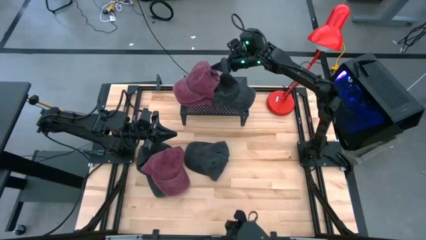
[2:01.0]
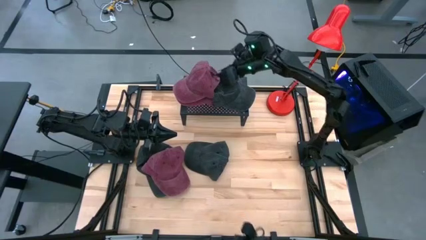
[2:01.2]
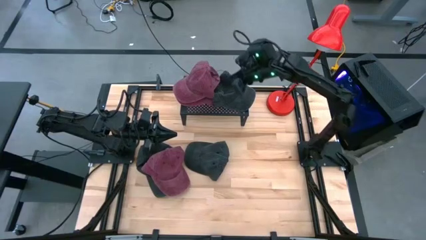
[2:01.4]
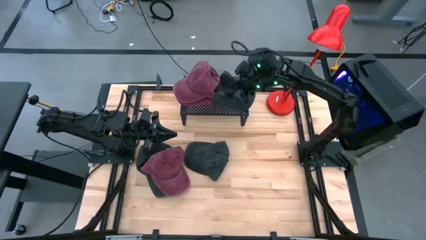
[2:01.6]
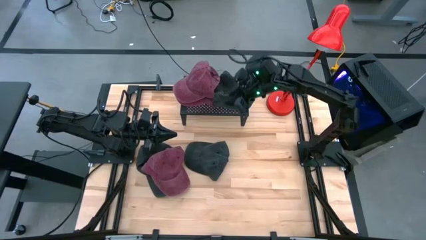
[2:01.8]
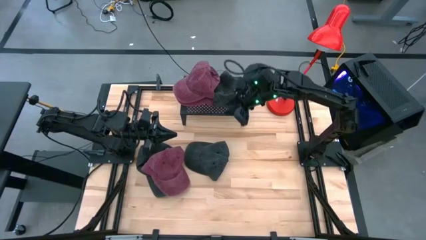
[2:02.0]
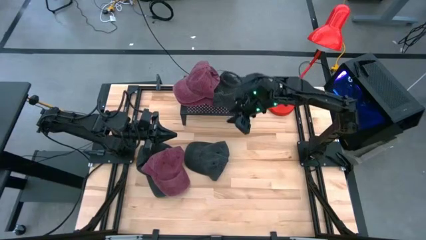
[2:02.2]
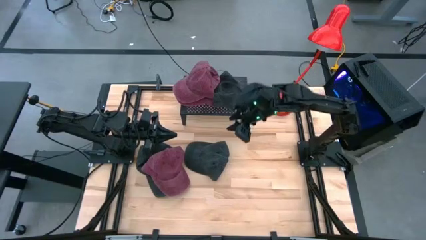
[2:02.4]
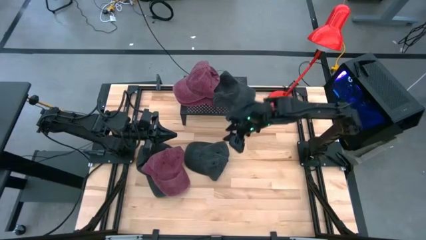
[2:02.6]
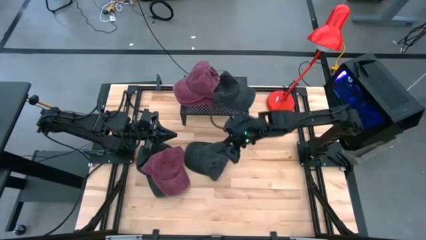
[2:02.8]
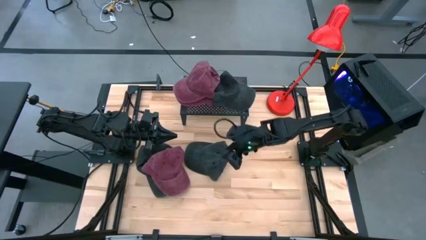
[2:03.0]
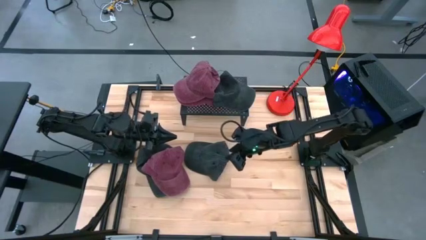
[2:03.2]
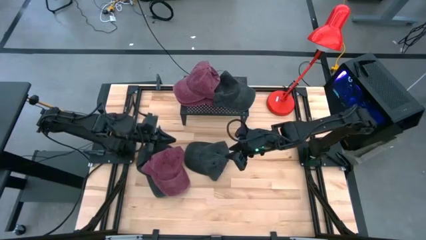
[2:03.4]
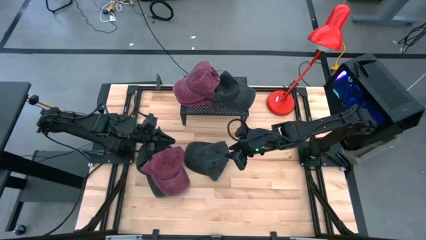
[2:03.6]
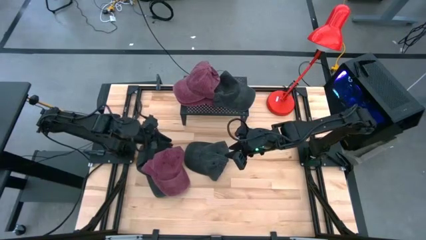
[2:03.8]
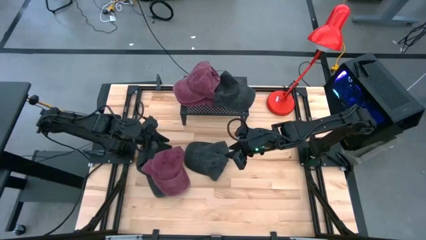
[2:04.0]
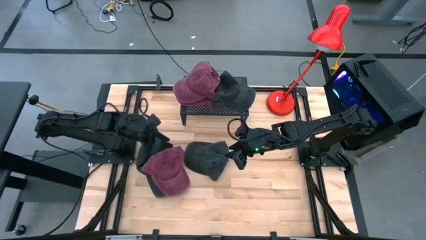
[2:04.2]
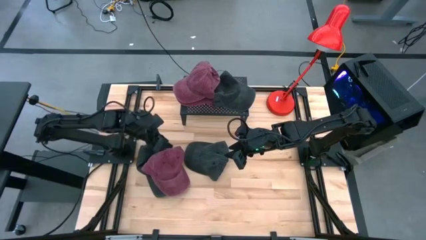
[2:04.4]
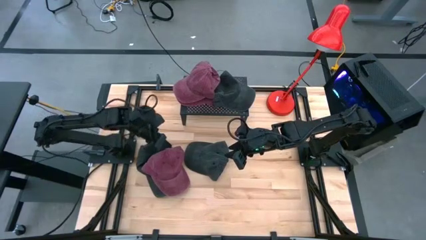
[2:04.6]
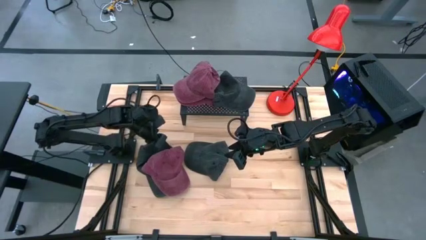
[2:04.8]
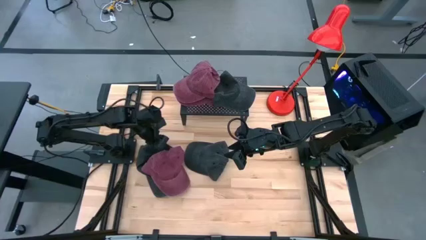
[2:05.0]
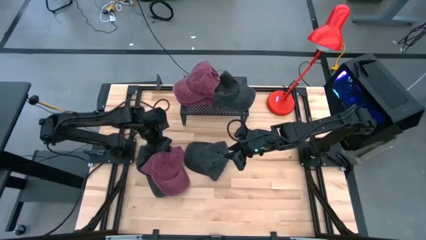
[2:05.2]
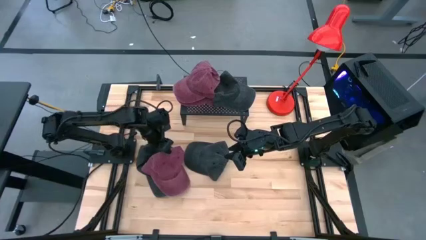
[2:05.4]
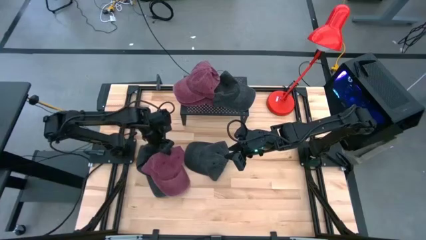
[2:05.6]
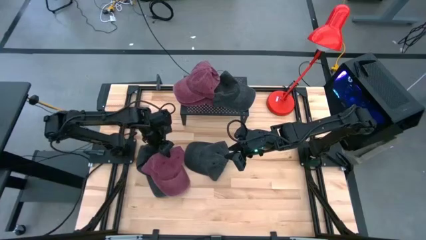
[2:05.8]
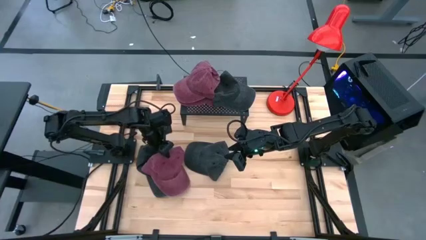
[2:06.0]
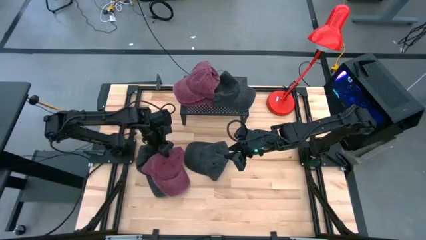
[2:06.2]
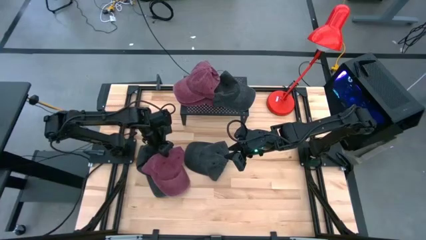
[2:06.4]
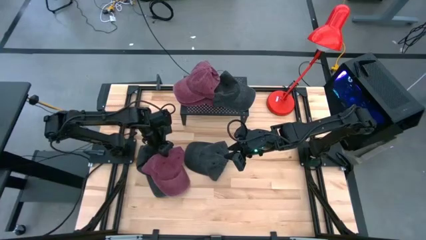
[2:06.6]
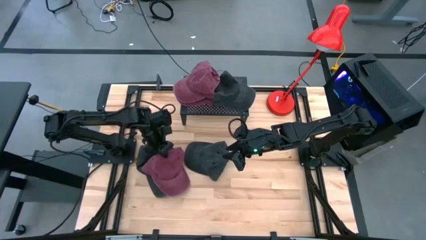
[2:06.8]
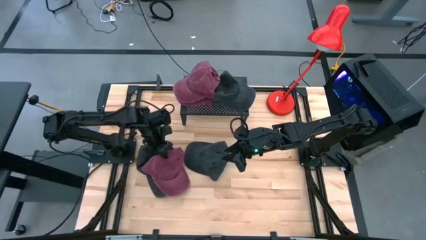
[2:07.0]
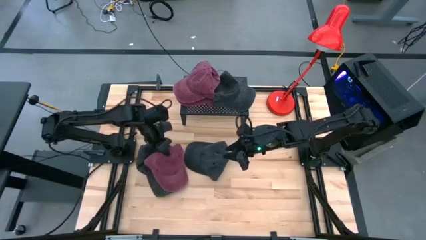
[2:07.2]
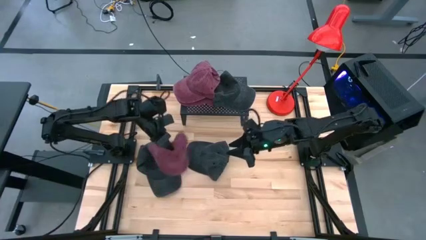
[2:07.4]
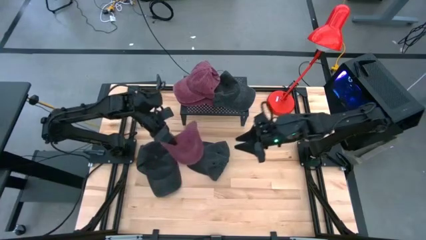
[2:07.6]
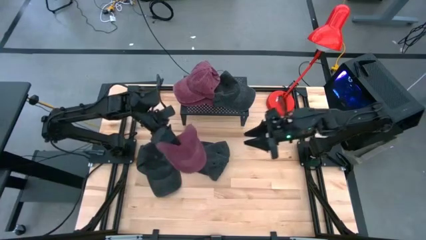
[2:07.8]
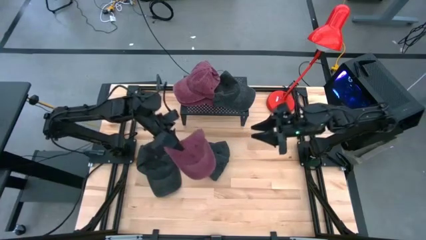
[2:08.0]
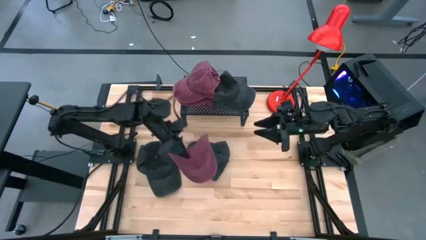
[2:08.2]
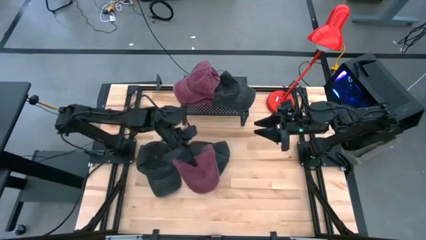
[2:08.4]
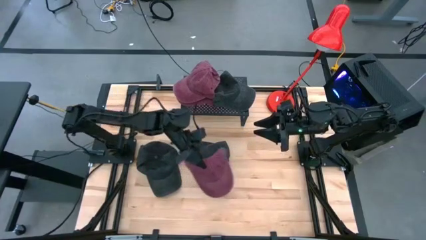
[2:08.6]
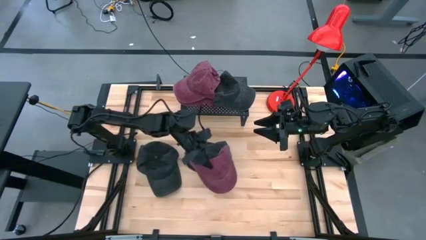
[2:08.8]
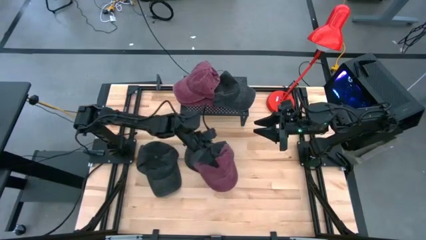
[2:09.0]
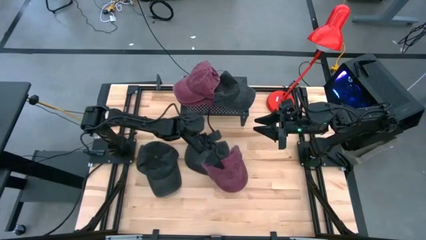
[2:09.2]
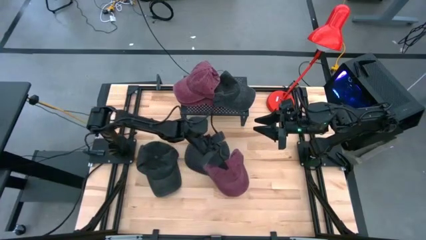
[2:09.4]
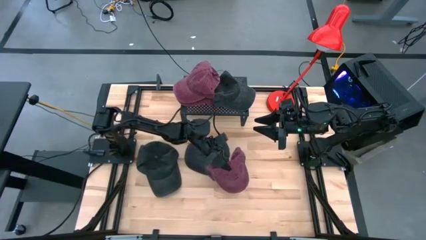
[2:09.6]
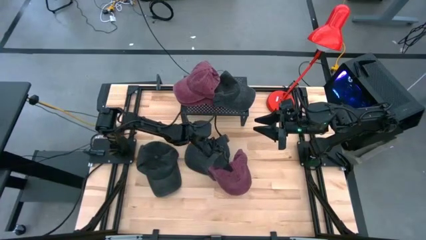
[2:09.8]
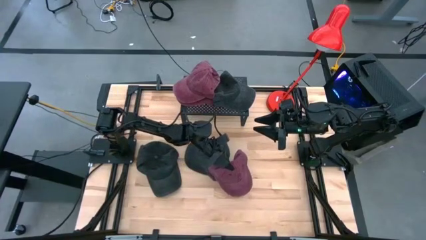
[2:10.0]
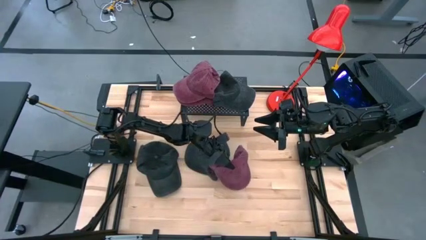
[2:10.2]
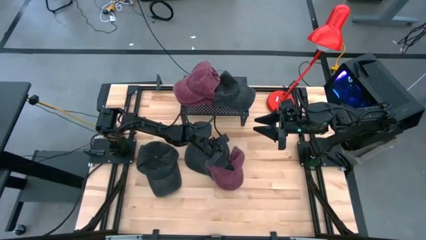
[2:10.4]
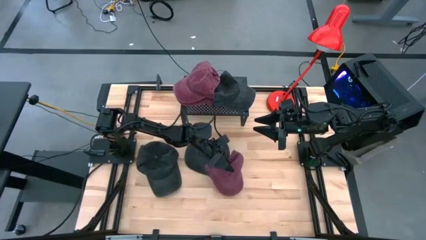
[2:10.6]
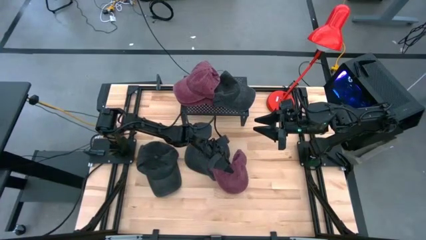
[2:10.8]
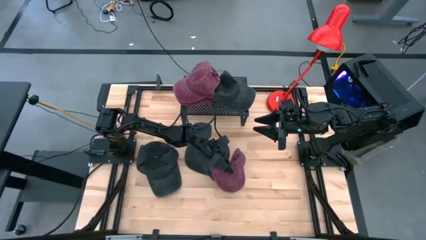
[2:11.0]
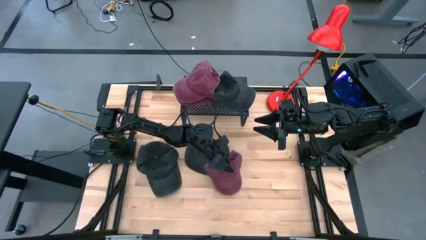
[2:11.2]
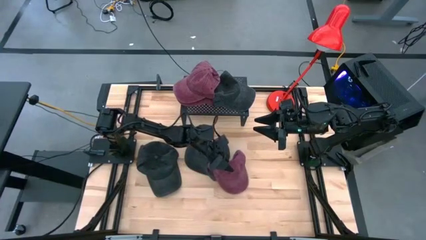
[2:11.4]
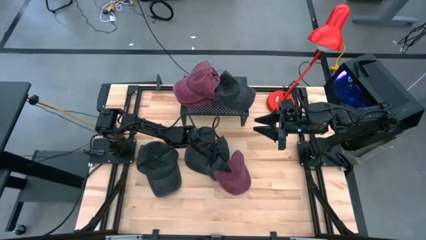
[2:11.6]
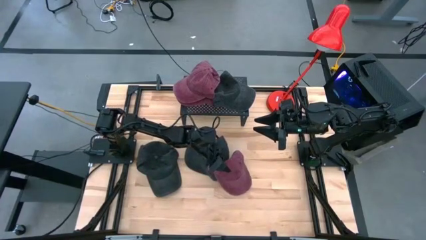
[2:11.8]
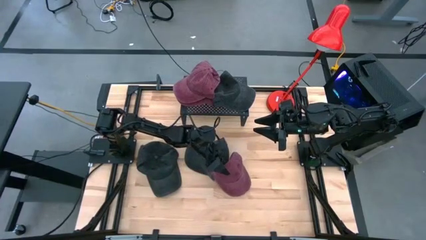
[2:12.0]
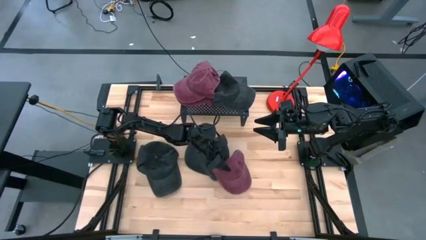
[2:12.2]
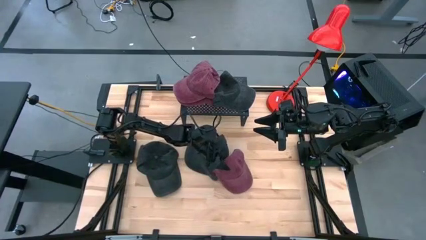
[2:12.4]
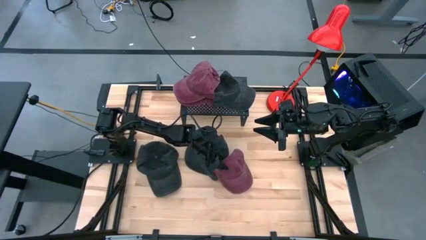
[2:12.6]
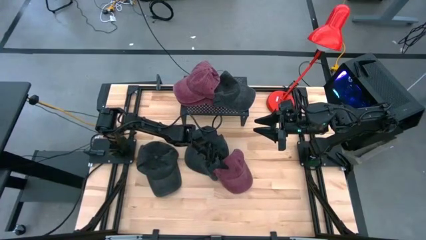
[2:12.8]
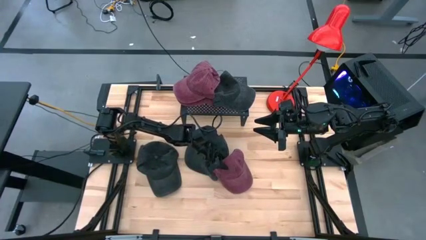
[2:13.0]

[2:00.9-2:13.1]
Task: Pick & Place hat
Put the red cap on top of the stacked red caps on the shelf

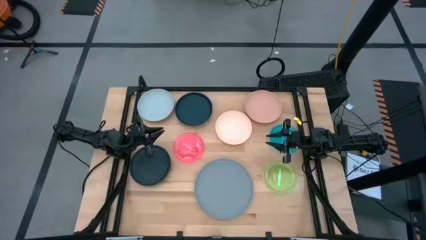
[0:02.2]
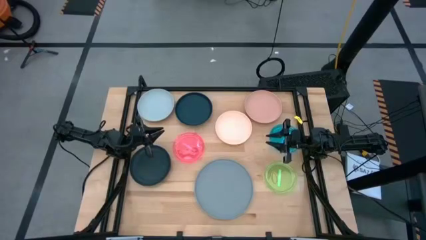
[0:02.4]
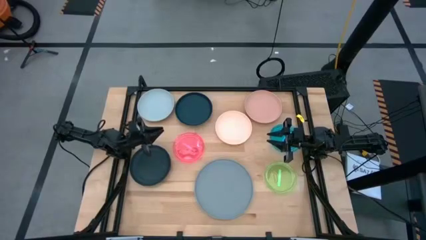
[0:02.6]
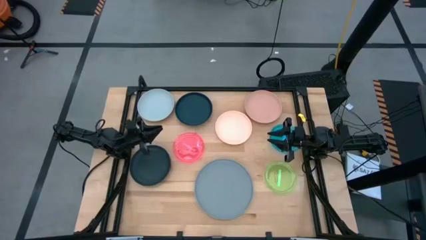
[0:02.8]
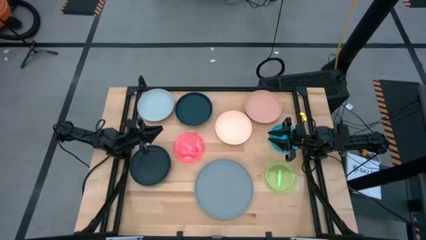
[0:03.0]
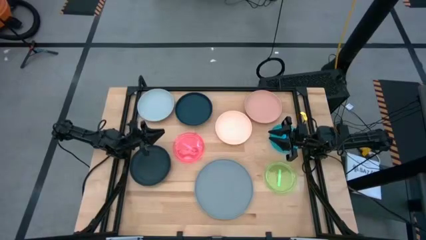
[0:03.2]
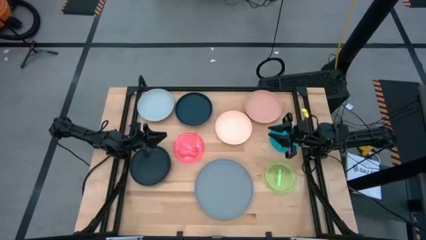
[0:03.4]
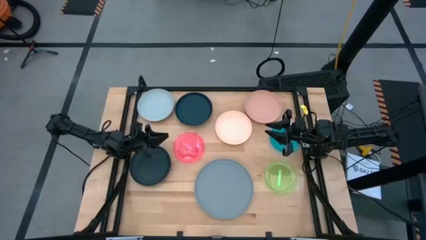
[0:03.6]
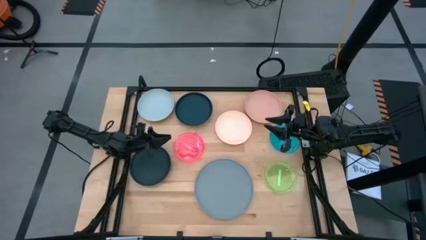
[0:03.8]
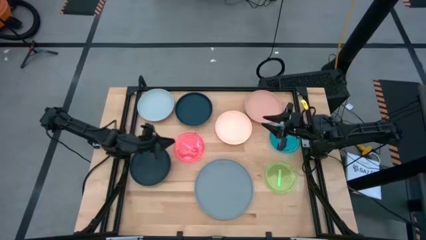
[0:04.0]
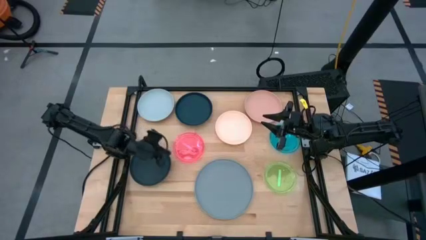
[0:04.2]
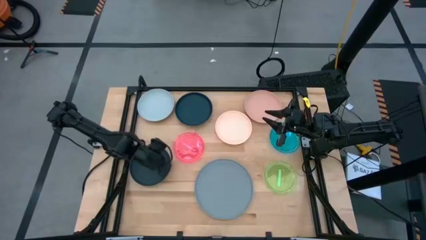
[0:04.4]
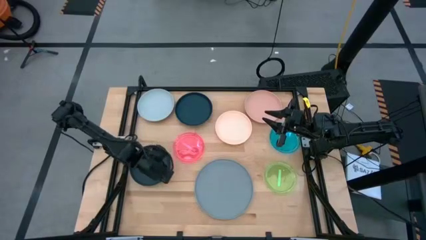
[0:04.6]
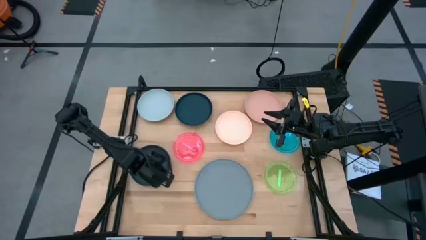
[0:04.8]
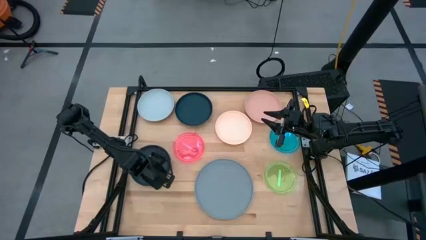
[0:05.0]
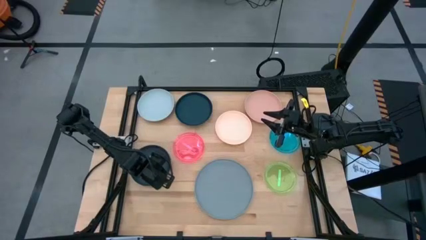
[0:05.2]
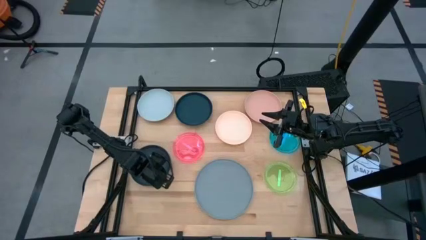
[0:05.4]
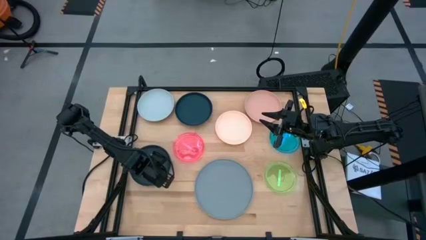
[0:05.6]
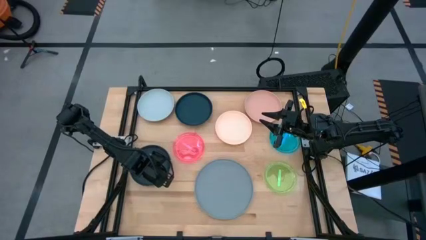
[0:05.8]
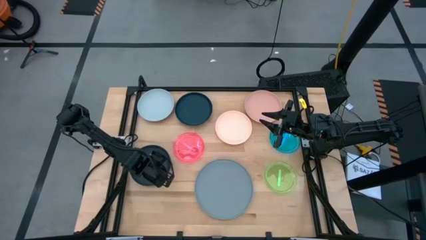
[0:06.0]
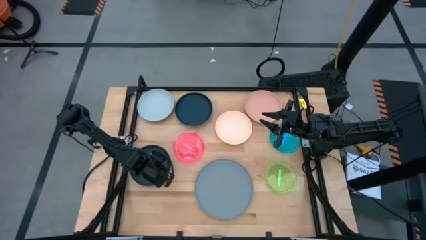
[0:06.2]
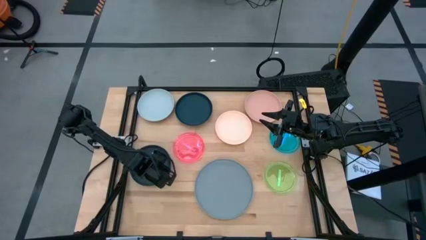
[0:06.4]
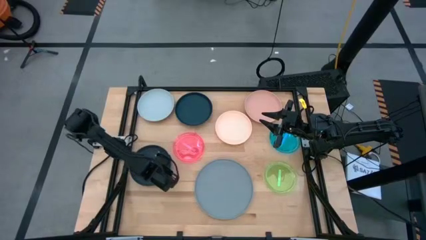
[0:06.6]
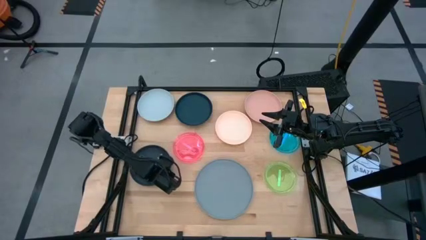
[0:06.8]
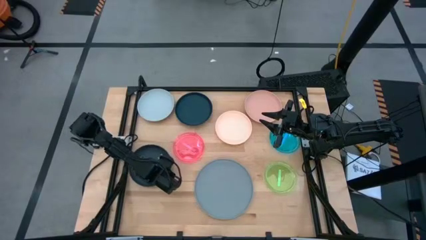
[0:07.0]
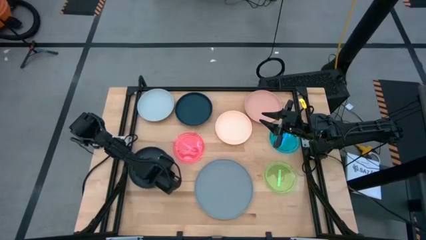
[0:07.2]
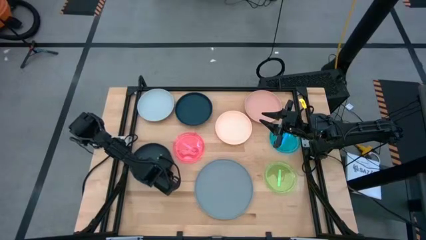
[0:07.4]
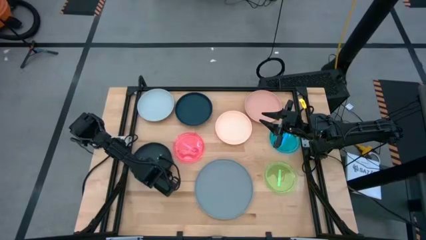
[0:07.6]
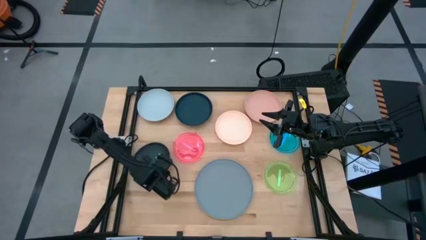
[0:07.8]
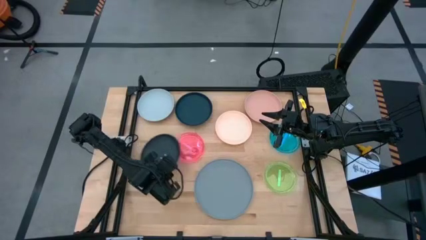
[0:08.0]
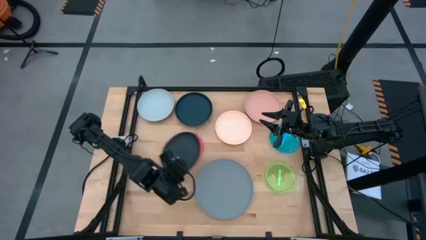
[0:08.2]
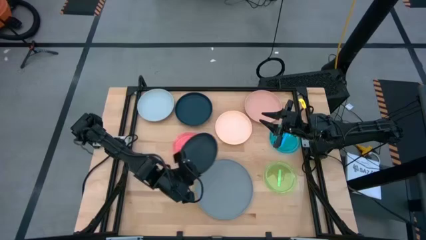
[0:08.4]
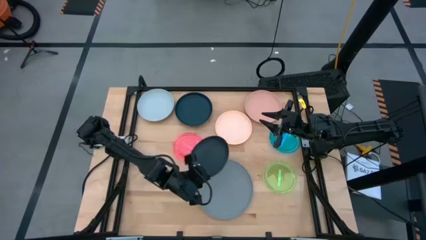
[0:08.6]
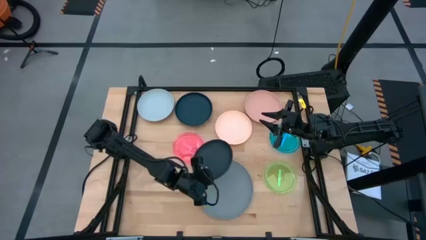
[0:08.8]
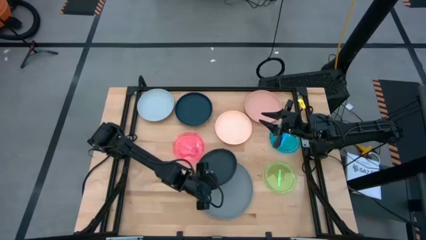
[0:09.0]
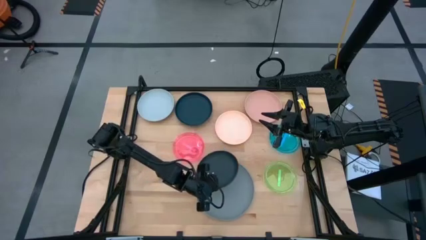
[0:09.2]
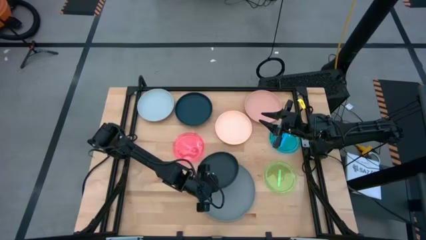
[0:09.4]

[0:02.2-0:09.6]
Task: Stack plastic plates
Stack the bottom black plate on top of the gray plate
